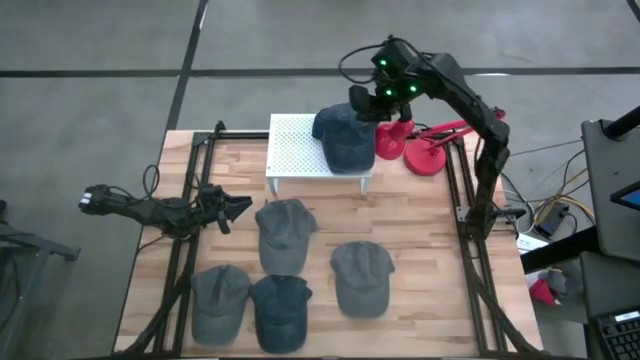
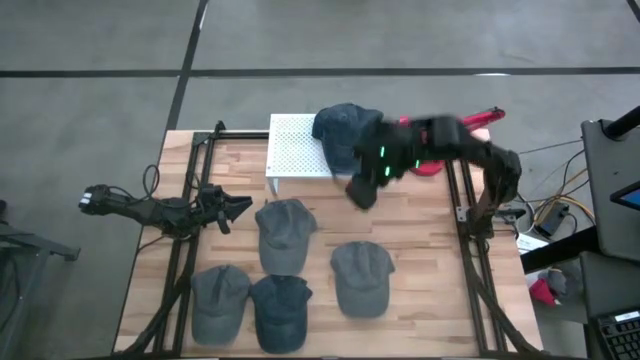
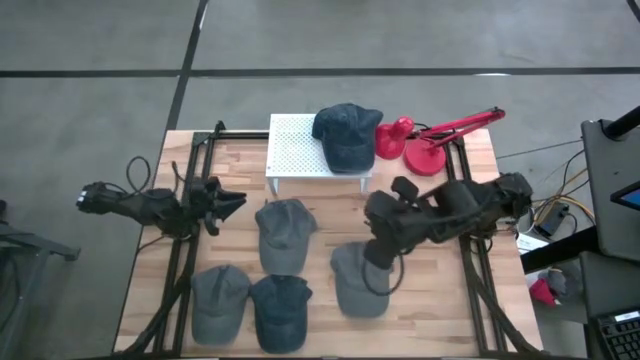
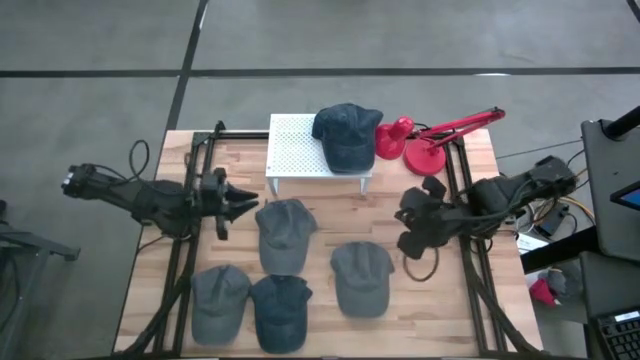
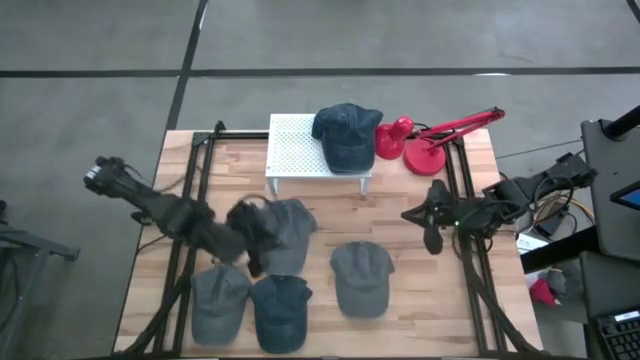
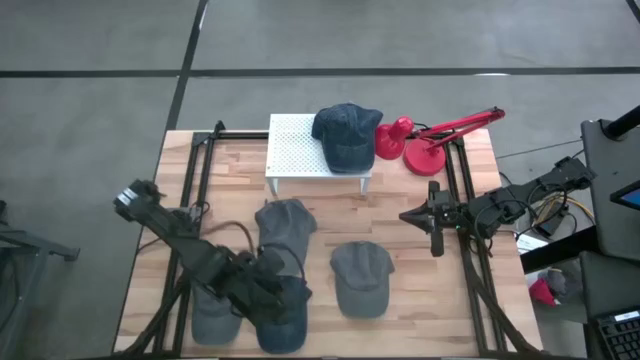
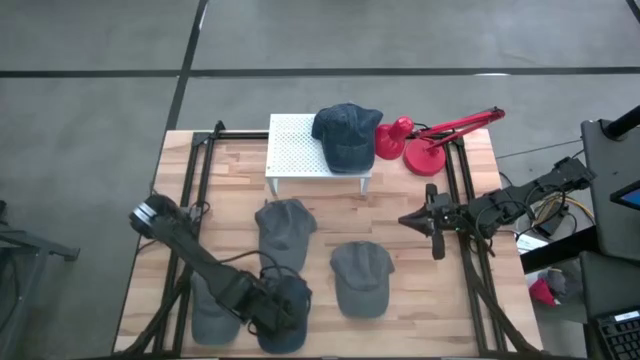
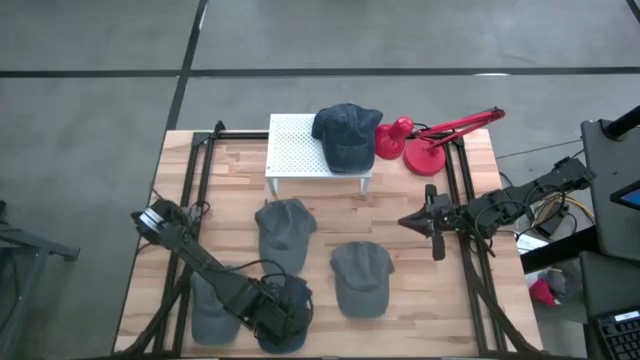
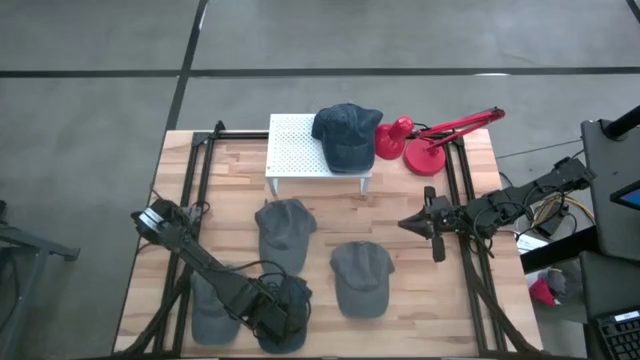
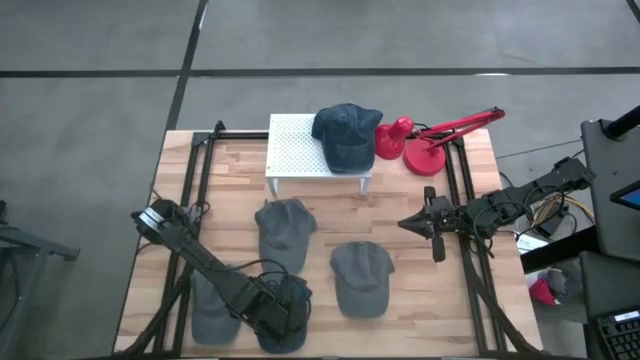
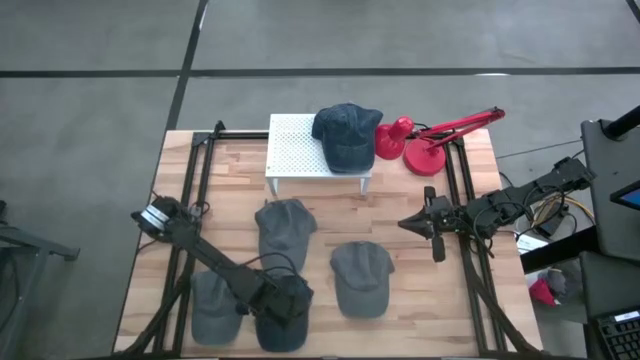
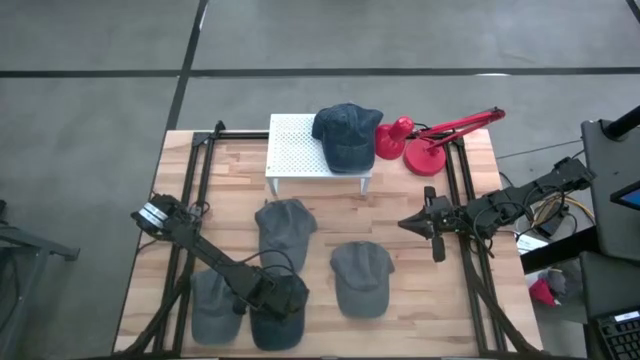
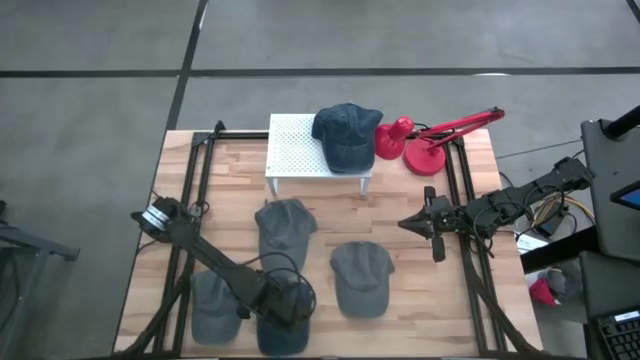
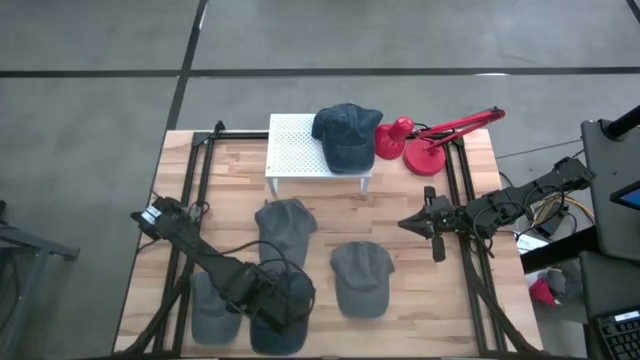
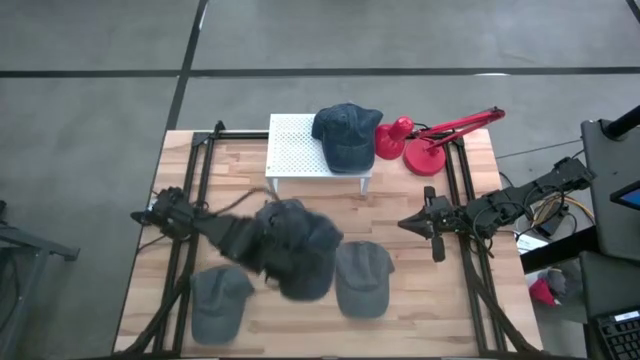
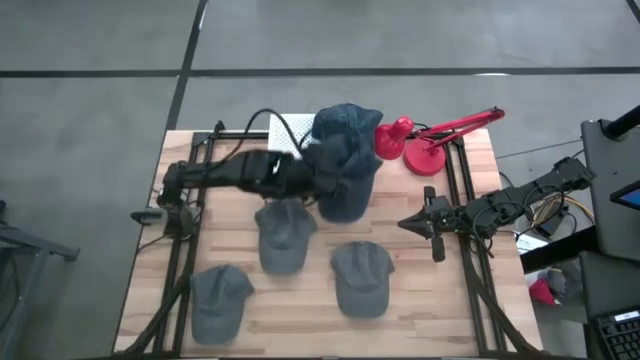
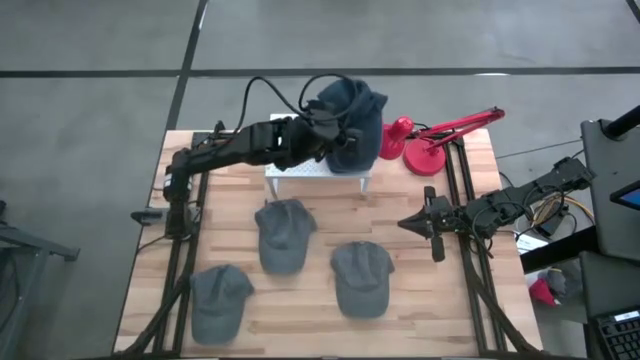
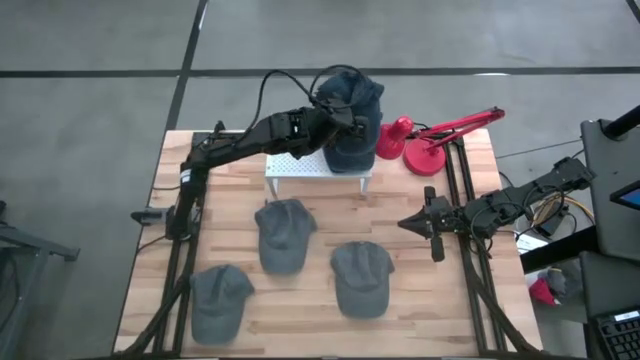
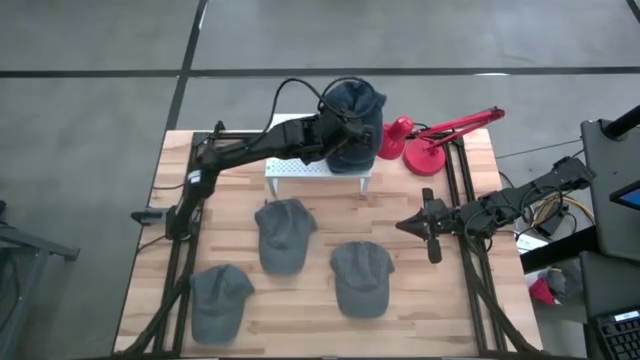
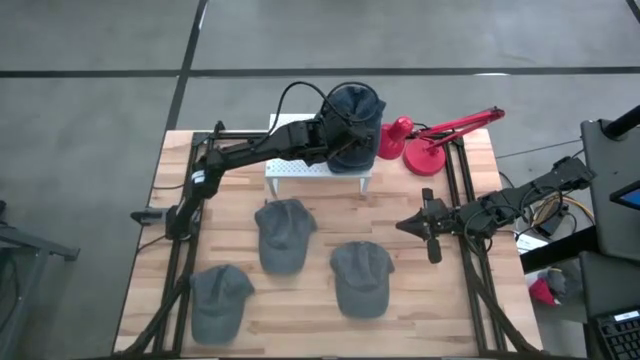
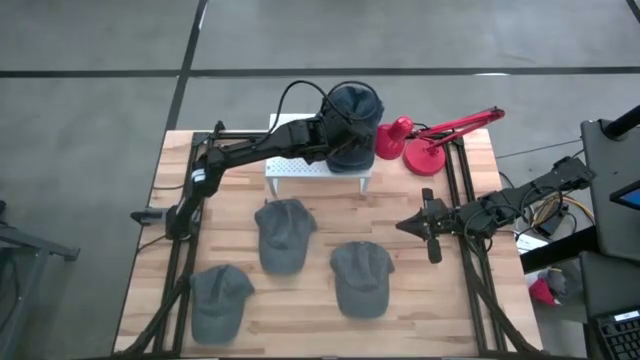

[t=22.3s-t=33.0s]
Task: Pick & Place hat
Stack the blue cap on the stacked blue caps on the shelf

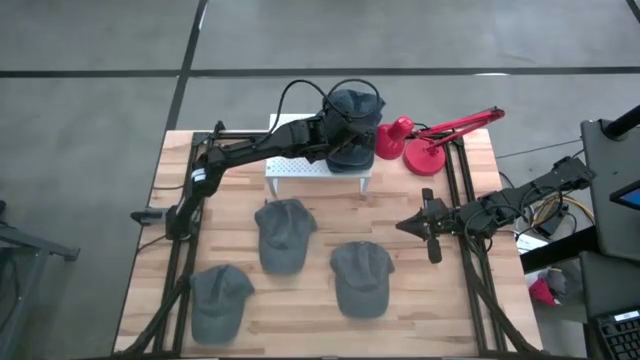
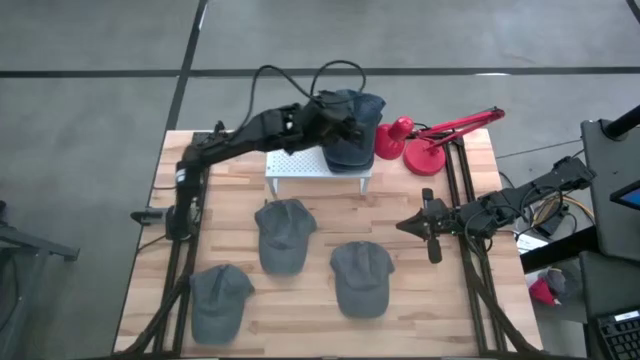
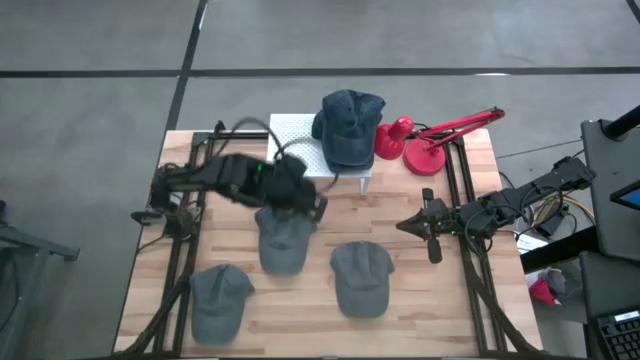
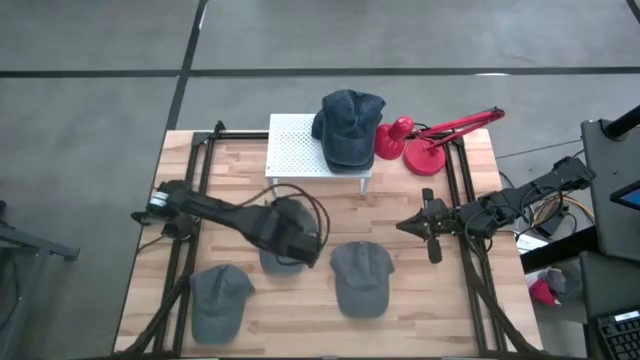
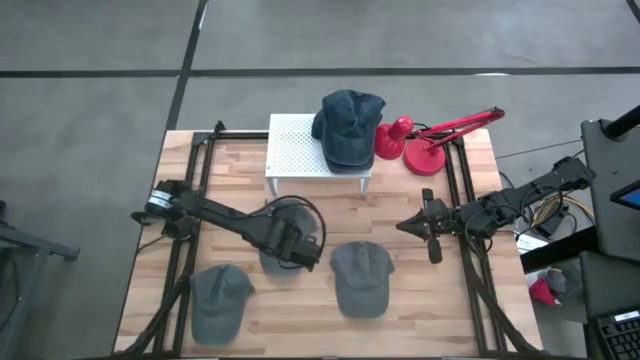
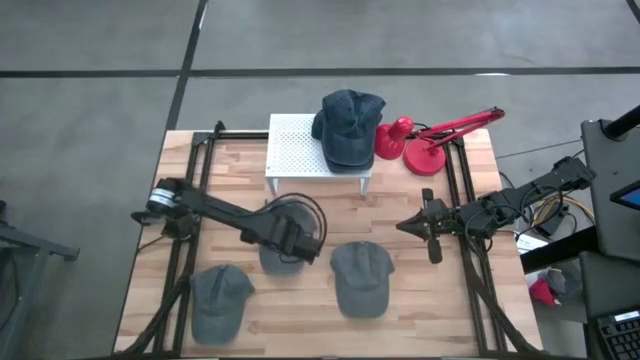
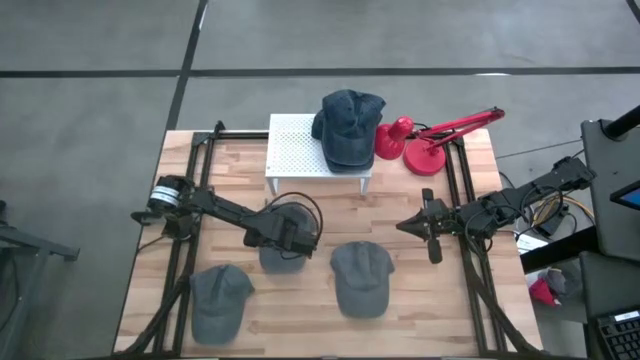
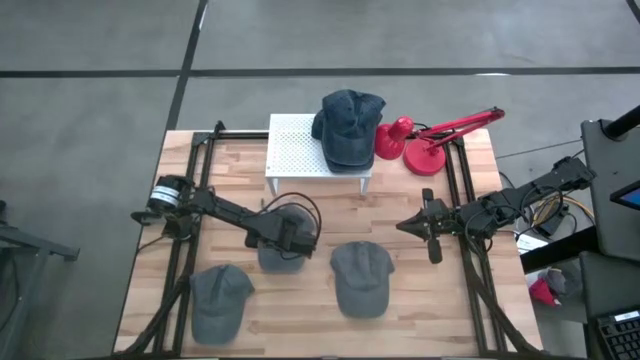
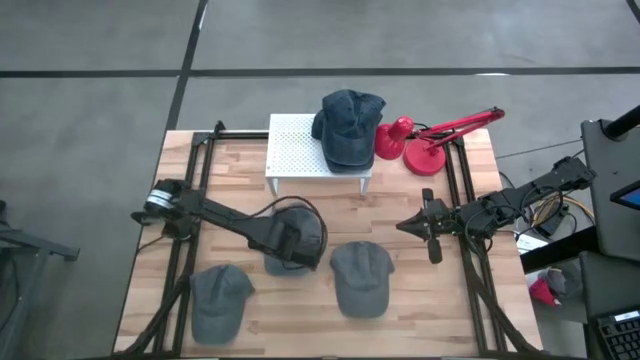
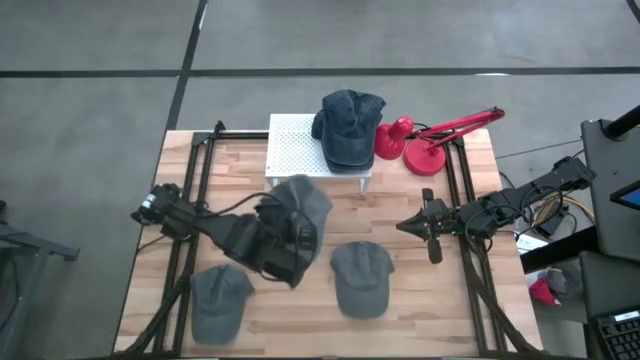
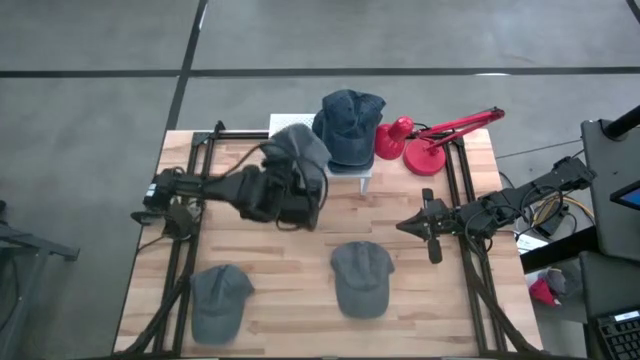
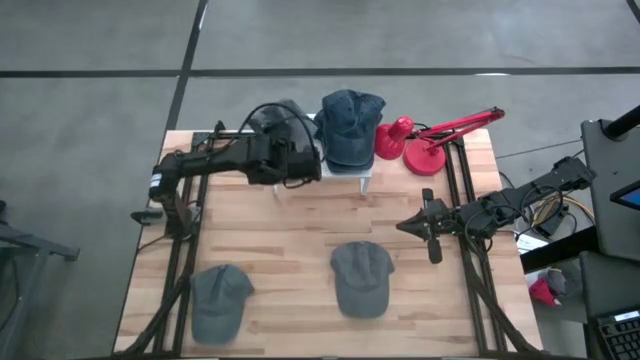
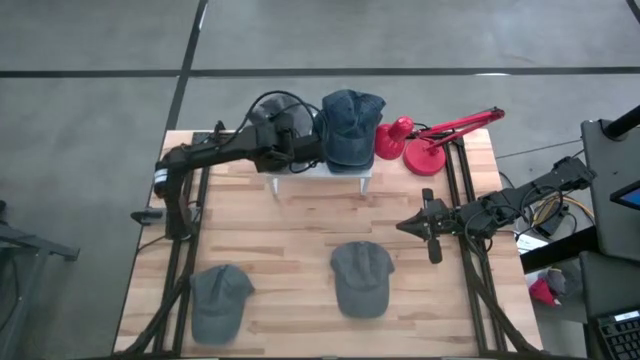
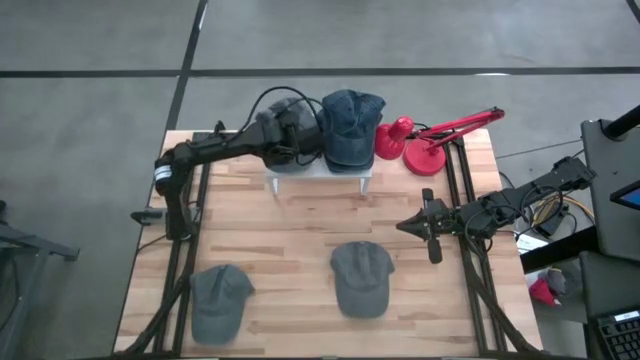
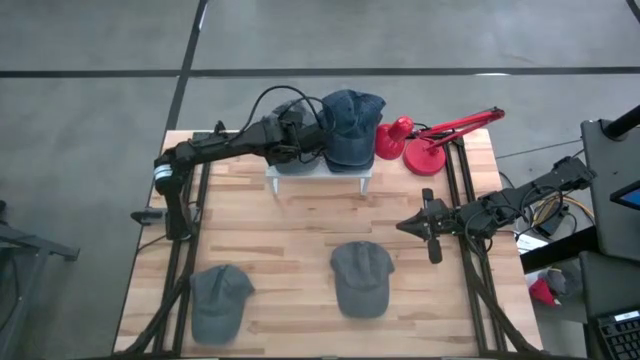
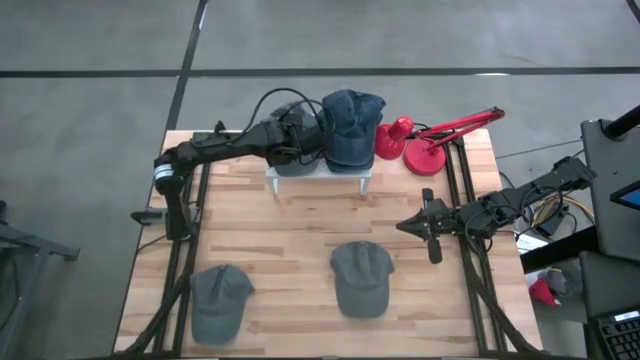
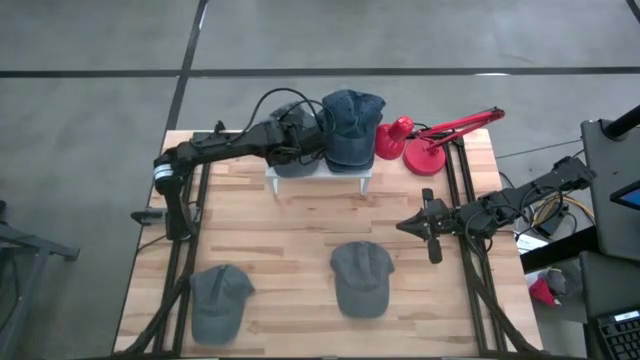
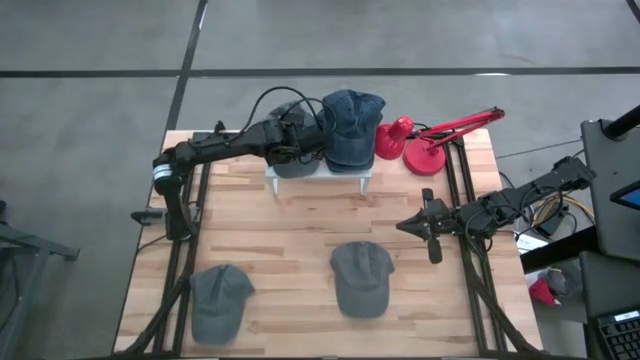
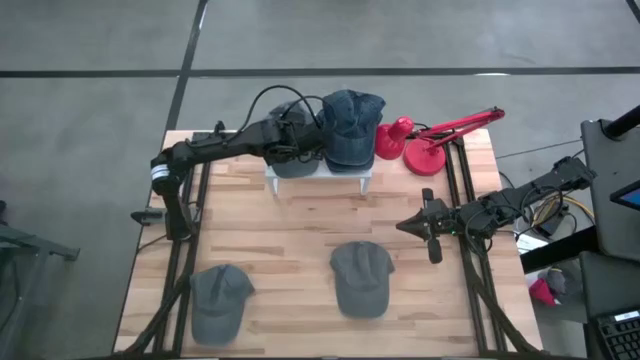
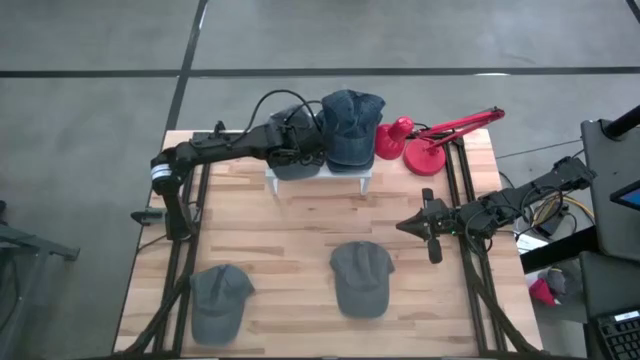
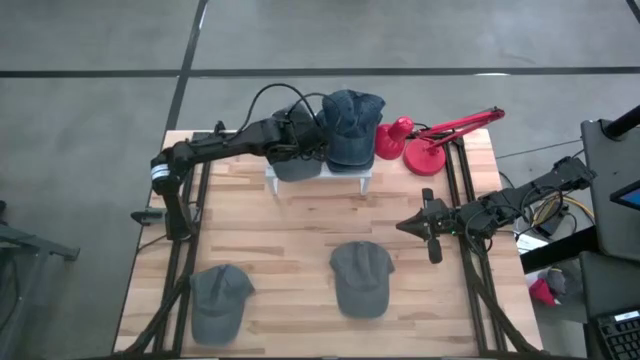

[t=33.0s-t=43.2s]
Put the top gray cap on the shelf
